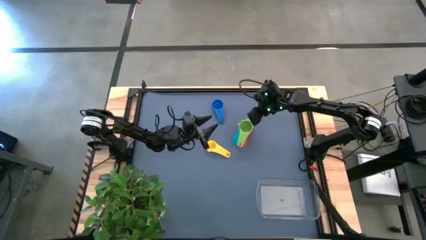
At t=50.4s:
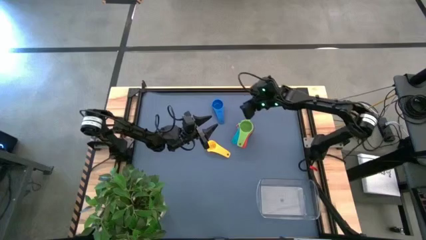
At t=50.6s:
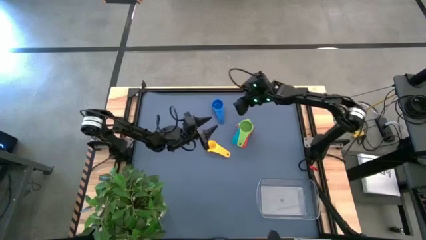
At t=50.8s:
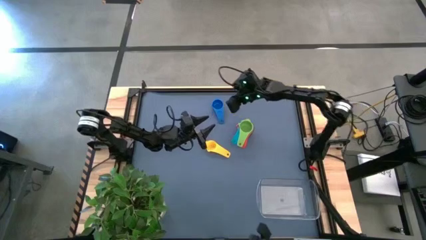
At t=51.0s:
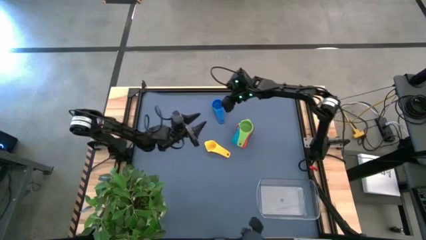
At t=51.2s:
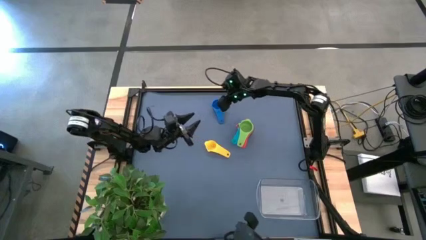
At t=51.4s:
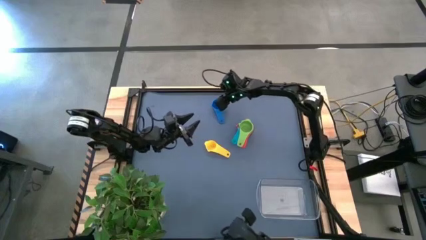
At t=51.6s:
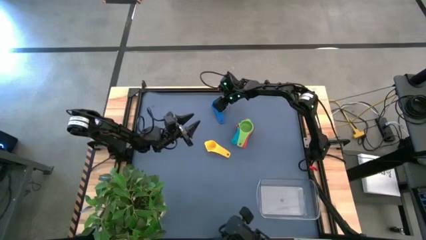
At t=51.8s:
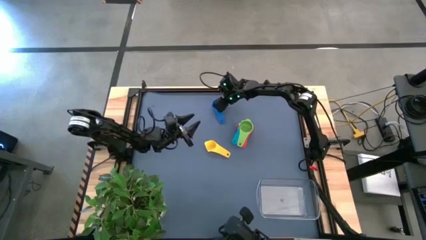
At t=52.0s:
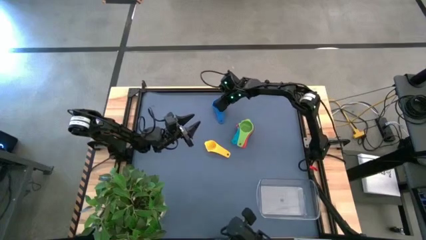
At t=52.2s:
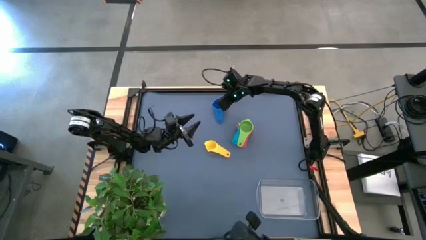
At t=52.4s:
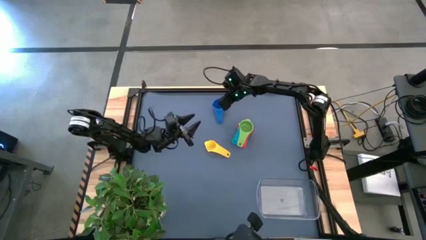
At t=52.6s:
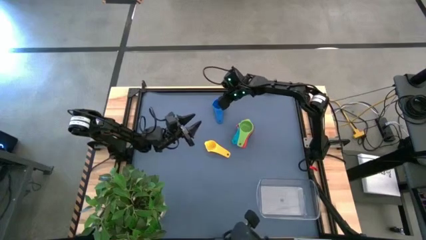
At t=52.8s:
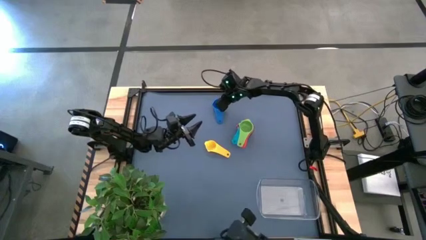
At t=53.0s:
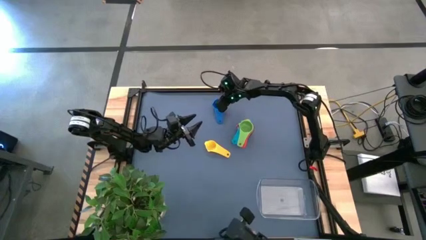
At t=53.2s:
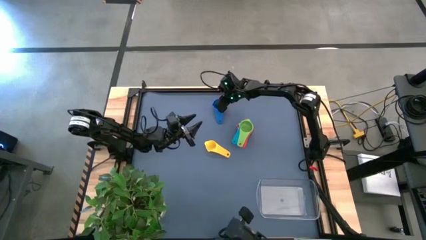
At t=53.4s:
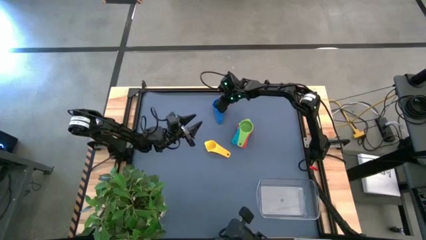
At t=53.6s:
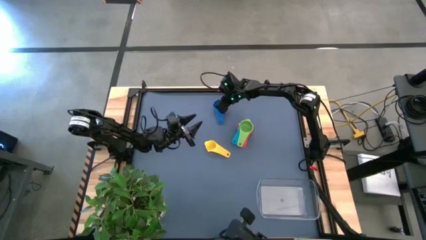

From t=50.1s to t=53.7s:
Task: Nest measuring cups in basket
Stack the blue measuring cup on top of the green measuring cup

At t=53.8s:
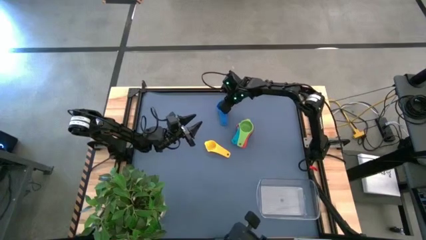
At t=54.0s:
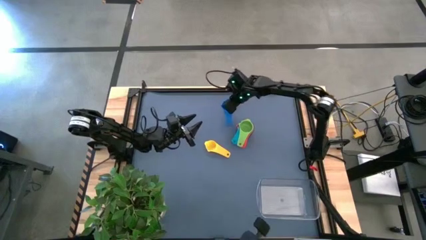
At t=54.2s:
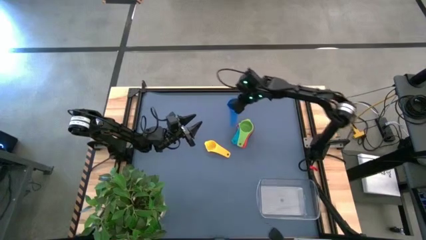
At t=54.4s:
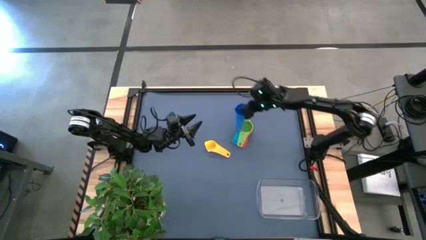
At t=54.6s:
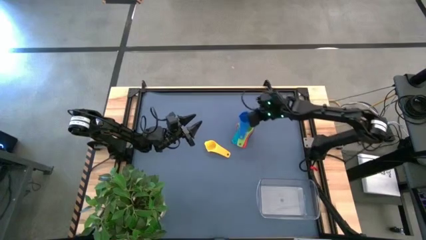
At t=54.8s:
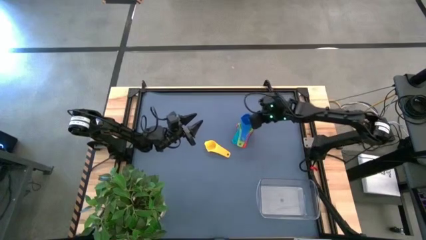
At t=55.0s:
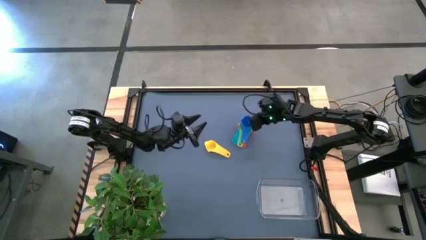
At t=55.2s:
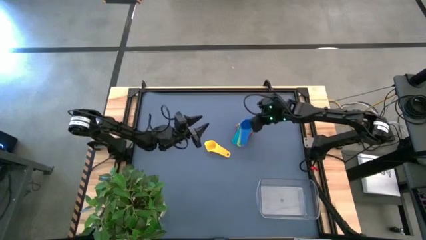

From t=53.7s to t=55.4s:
Stack the blue measuring cup on top of the green measuring cup

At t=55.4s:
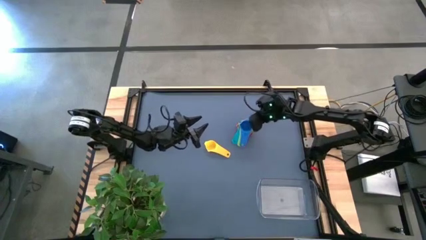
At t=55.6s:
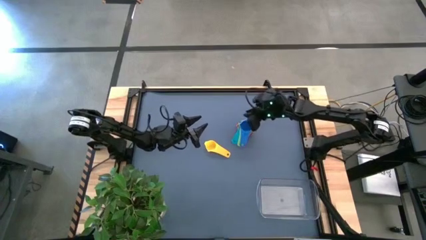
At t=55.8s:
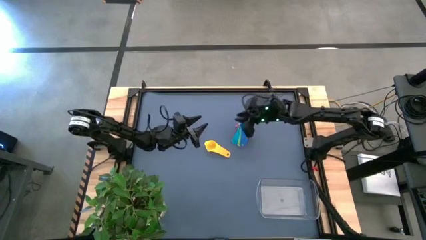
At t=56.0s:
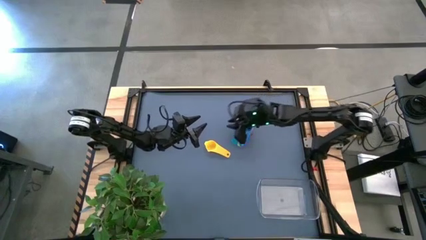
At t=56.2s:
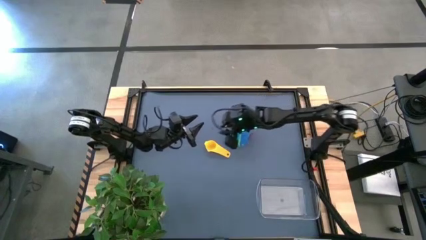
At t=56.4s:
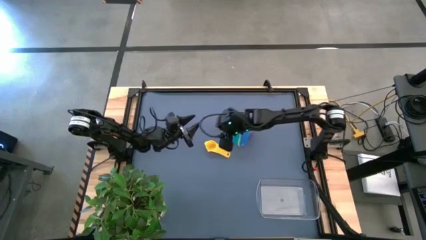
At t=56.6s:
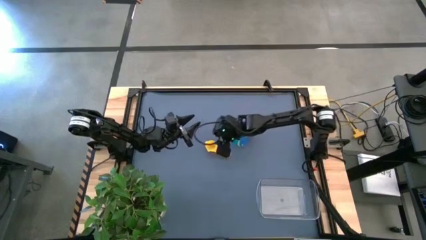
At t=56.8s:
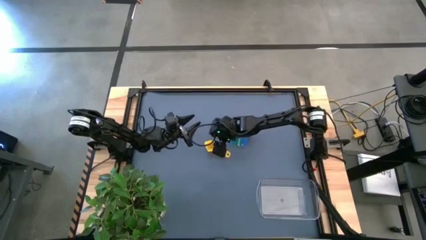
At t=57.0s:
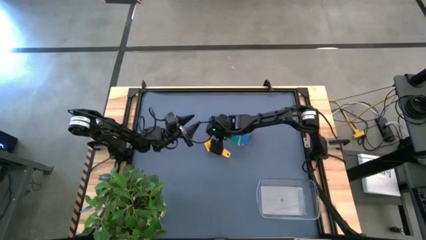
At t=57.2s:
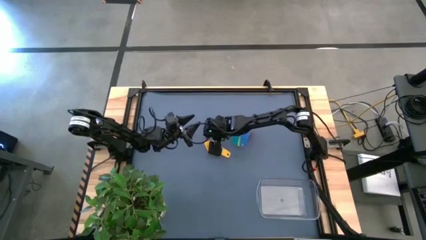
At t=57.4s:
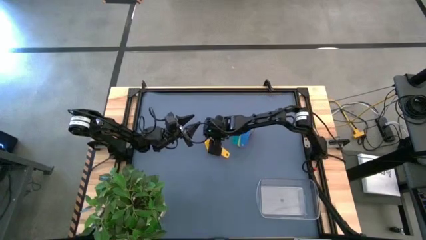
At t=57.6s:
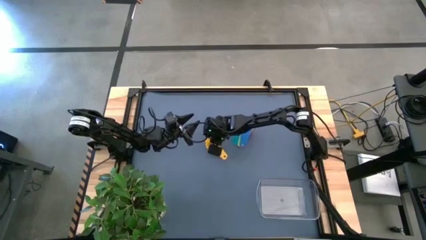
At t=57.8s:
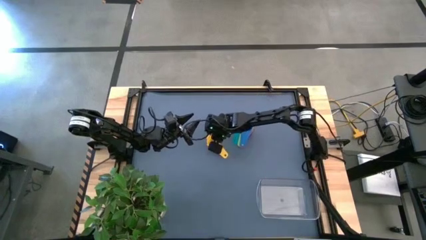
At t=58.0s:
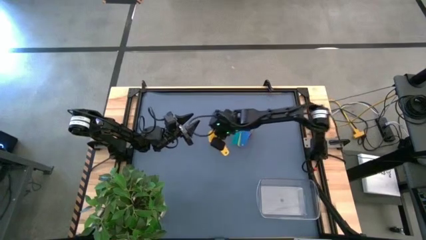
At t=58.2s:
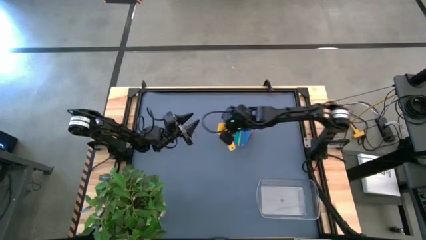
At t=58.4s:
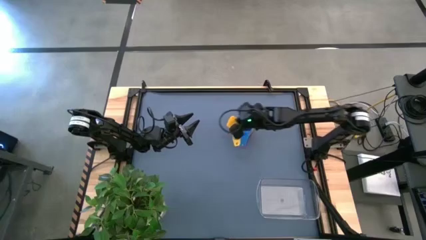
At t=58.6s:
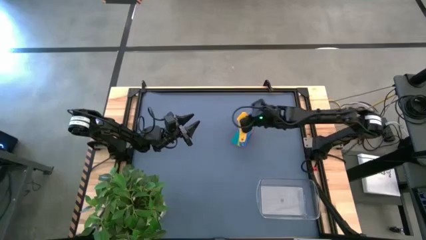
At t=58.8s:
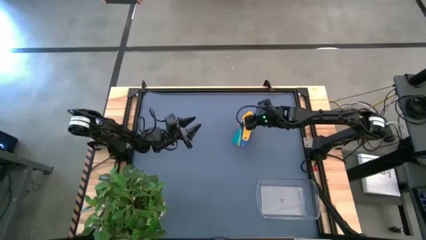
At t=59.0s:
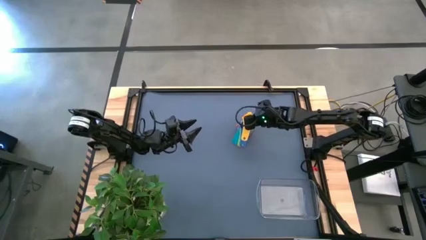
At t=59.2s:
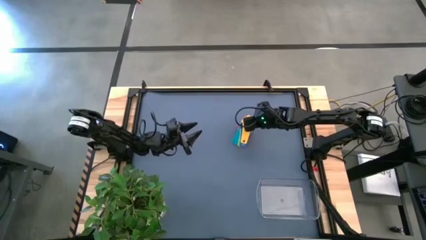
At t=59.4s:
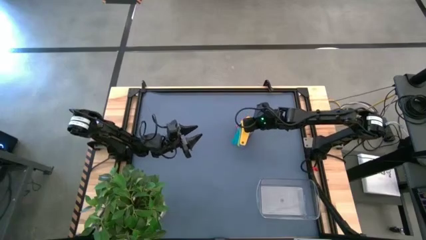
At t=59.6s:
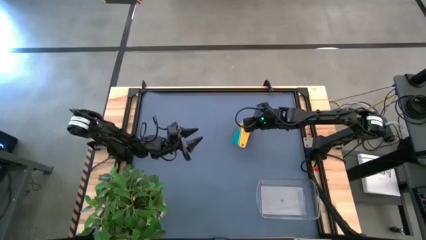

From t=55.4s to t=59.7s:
Stack the yellow measuring cup on top of the blue measuring cup

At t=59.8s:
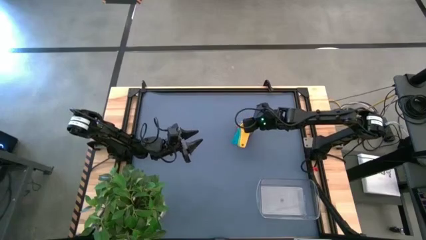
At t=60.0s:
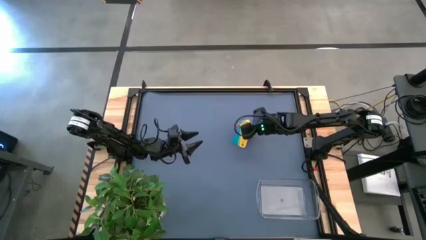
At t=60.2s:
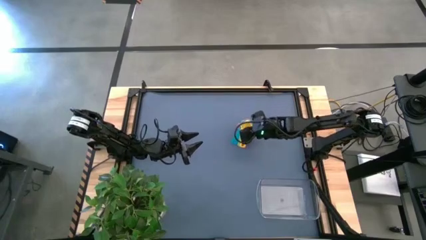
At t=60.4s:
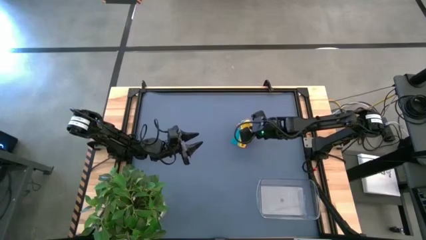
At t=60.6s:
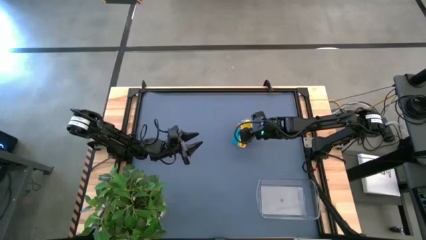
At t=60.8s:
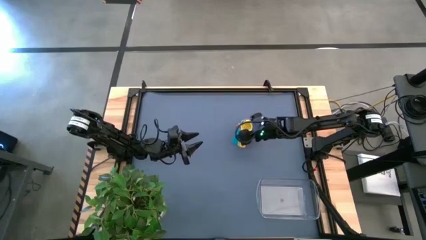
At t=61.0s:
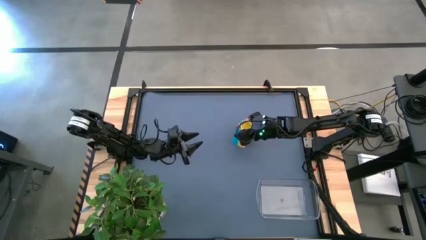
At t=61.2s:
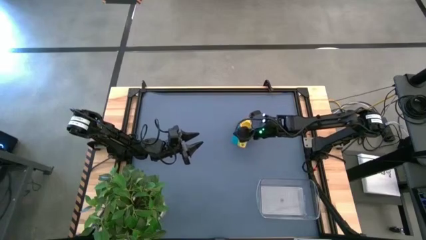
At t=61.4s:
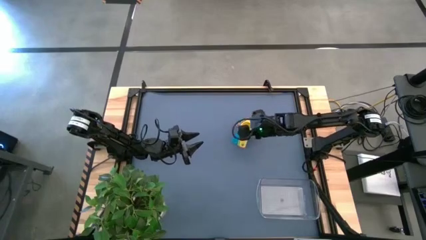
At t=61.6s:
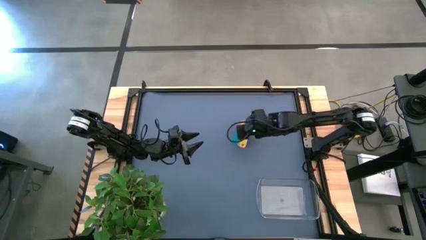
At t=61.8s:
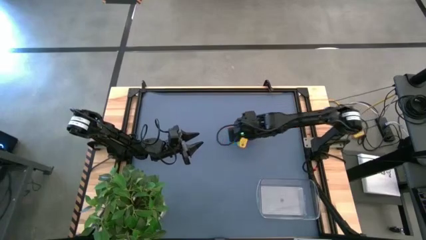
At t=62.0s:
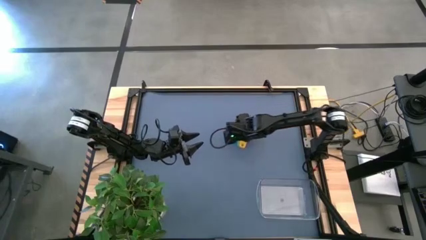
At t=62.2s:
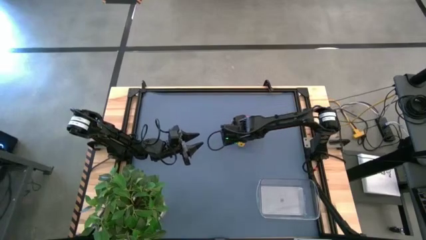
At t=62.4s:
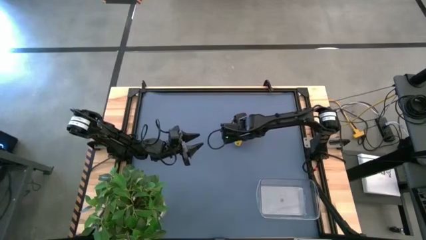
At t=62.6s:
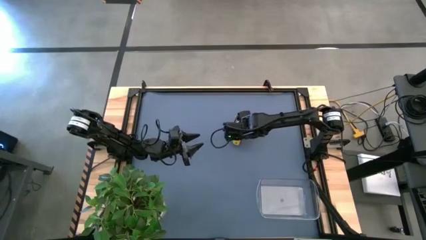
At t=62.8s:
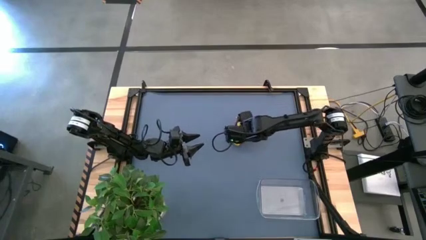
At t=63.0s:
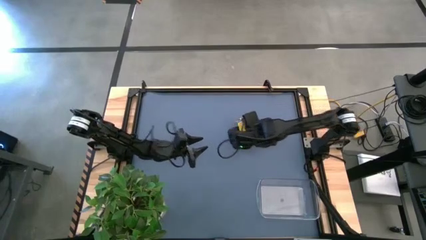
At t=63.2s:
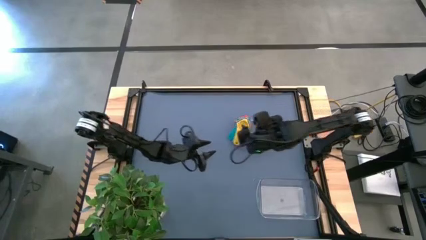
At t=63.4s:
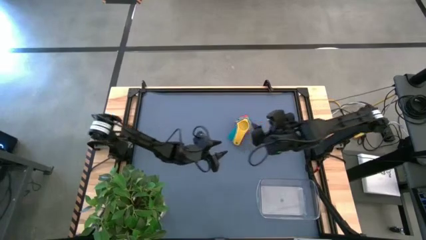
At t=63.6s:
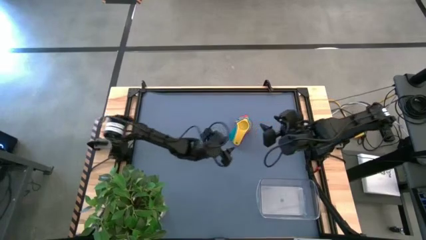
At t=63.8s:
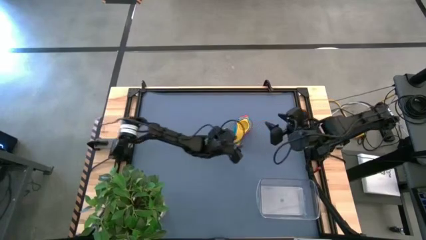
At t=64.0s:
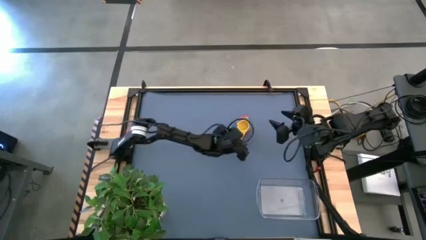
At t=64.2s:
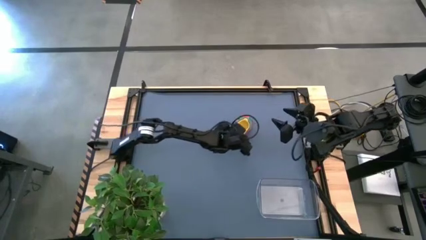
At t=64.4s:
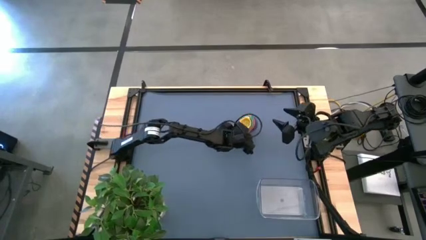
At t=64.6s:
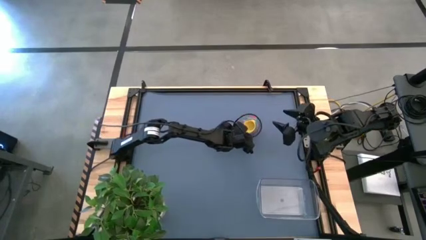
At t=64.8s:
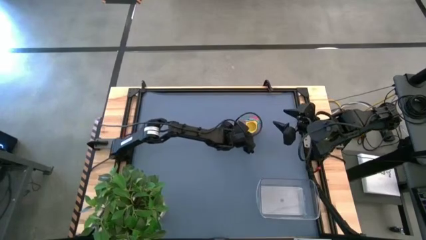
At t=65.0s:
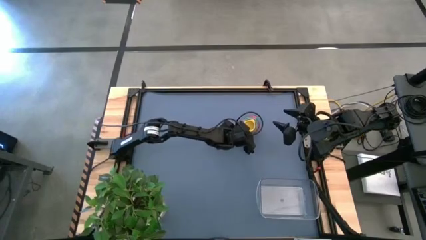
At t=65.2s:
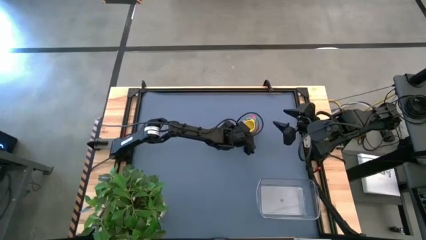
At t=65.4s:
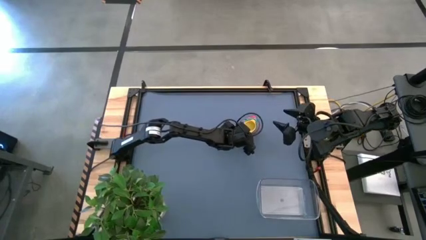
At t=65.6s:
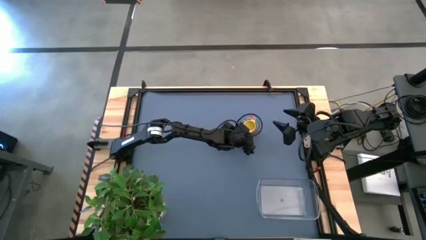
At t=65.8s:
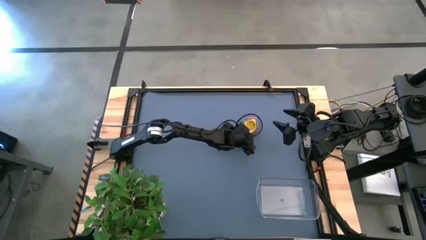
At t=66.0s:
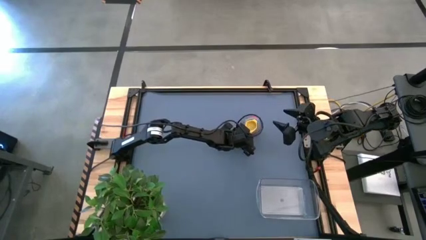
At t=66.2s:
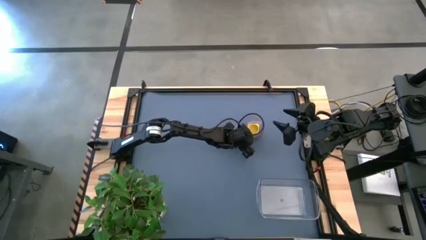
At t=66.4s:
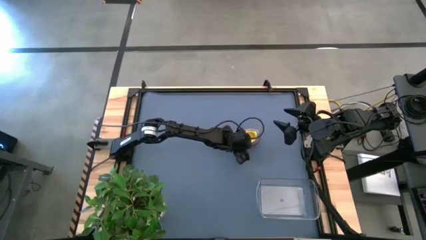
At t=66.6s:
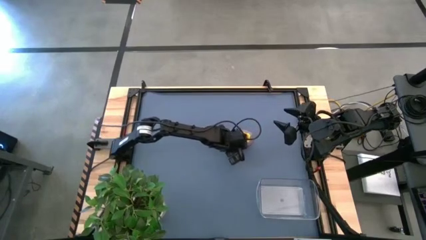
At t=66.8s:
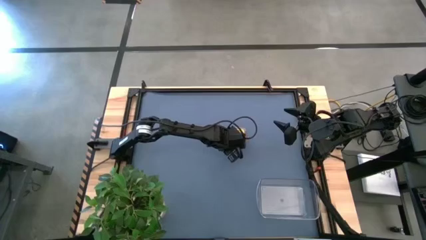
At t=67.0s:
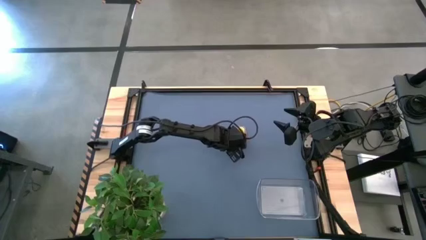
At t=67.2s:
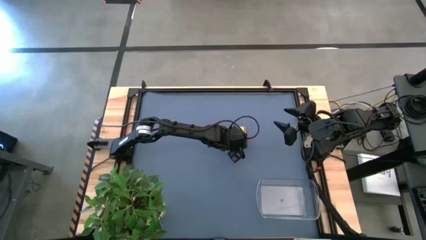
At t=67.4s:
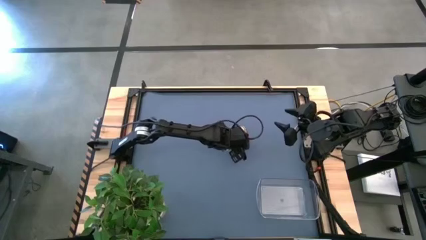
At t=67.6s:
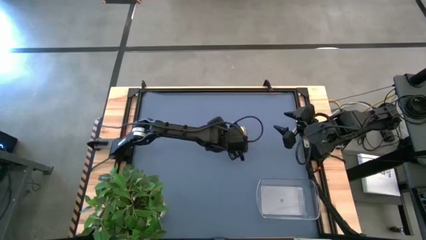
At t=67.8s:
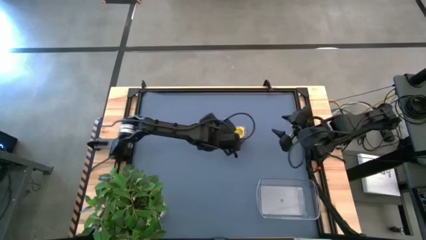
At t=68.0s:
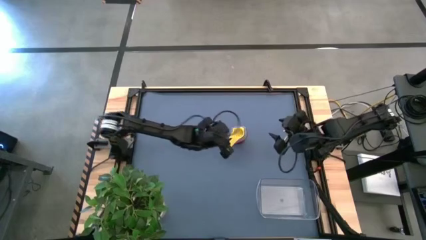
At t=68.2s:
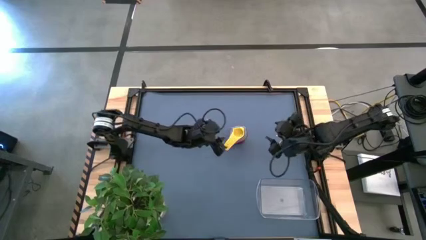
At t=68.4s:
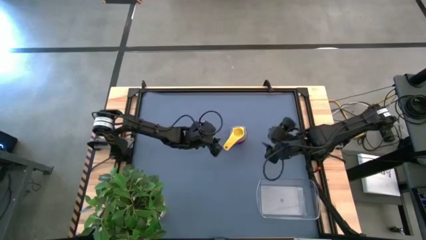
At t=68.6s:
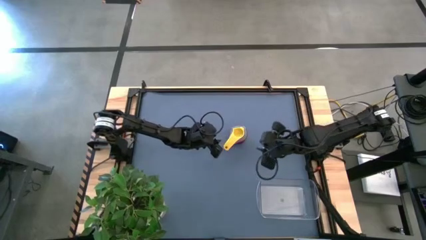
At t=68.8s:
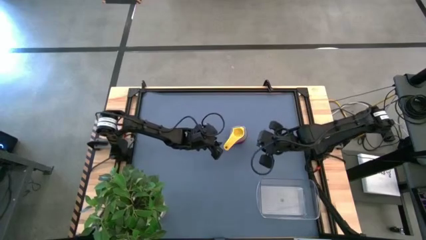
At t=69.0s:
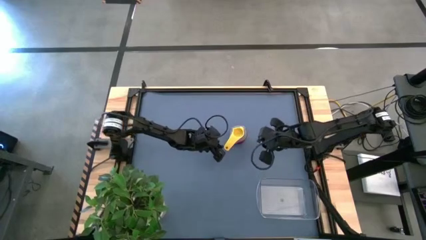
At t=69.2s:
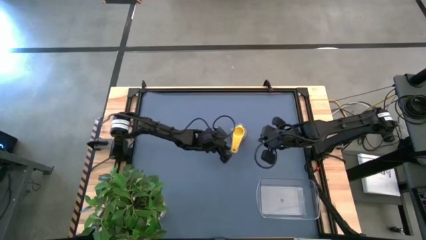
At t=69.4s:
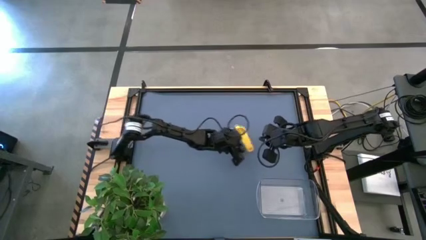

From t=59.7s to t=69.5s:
Put the colorful nest measuring cups into the transparent bin
